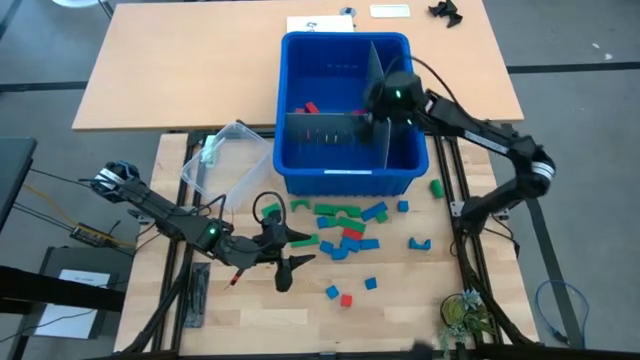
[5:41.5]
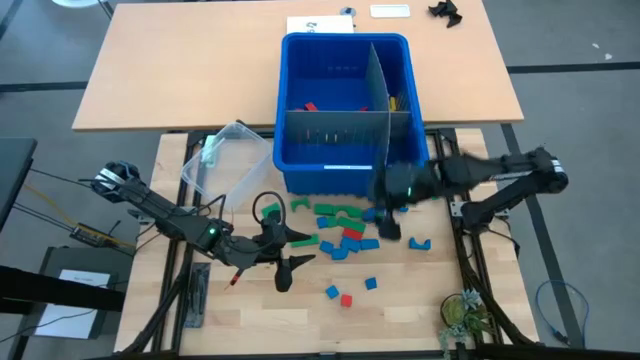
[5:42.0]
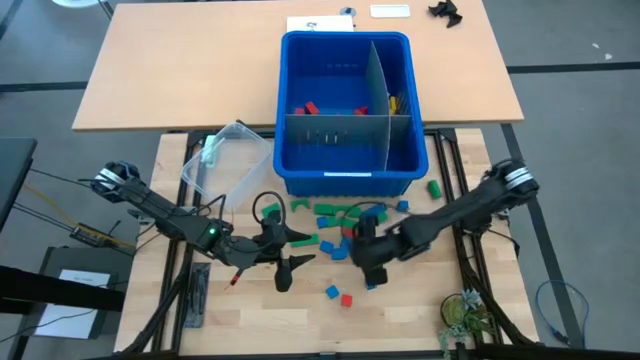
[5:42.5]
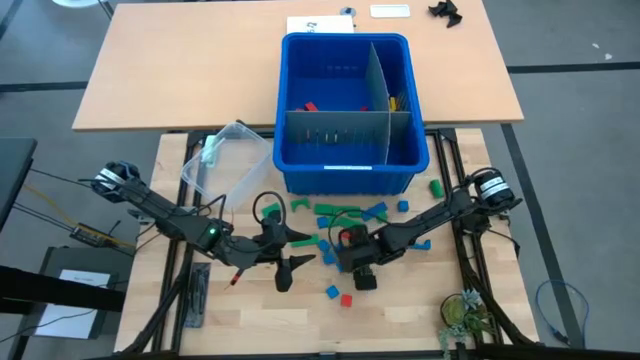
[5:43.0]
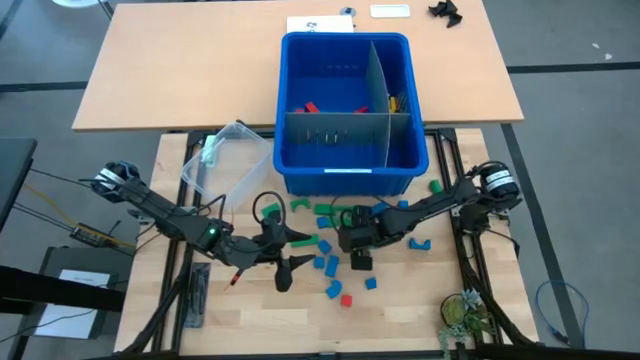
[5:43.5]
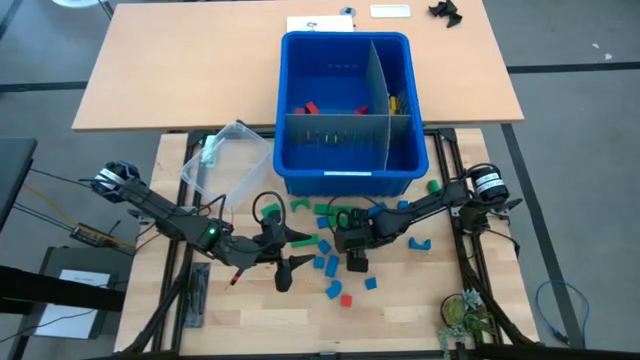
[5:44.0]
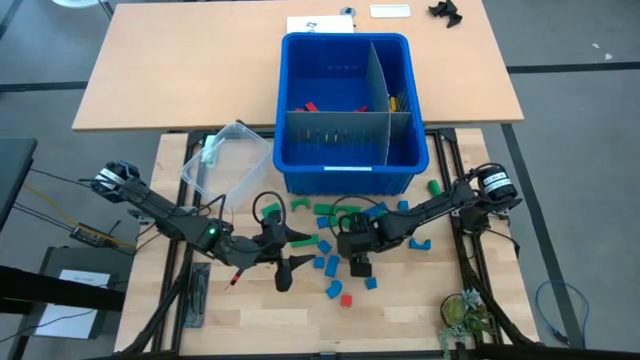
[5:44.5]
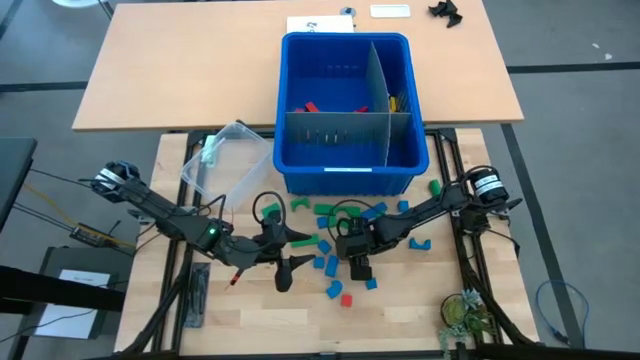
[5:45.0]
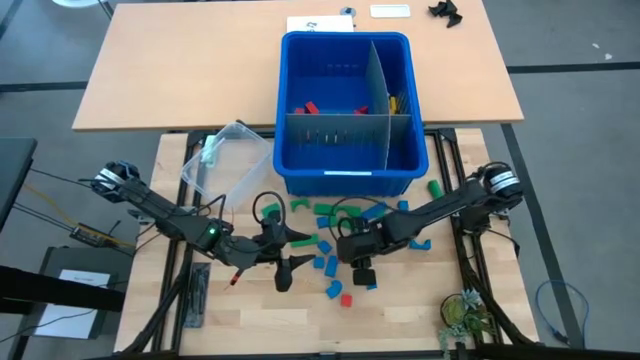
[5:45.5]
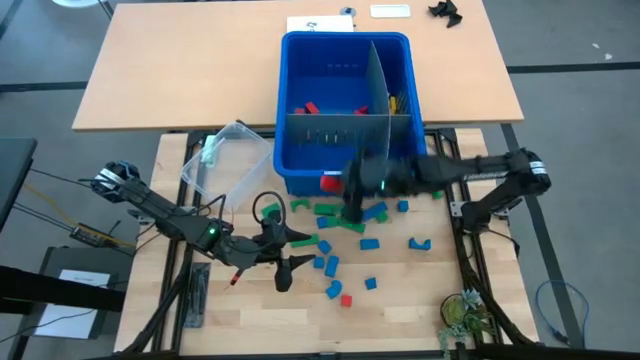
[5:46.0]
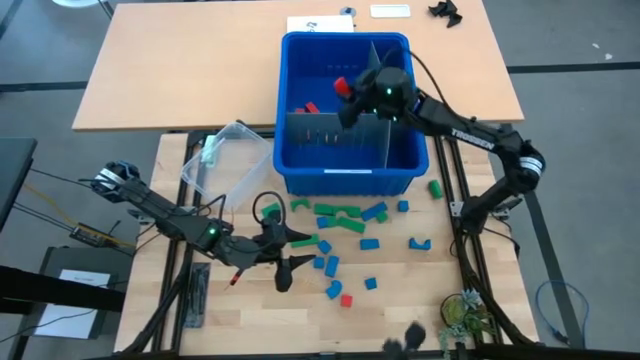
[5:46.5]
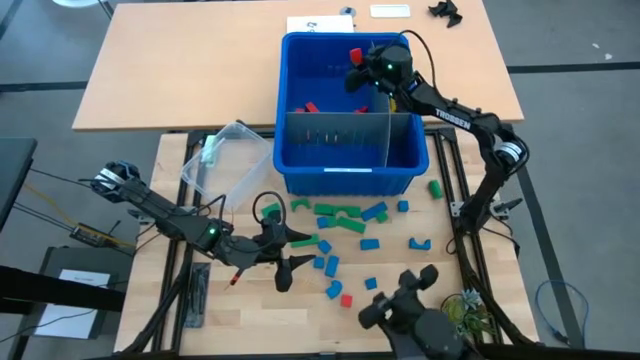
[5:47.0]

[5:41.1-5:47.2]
Task: Sort blocks
Put the red block into the blue bin

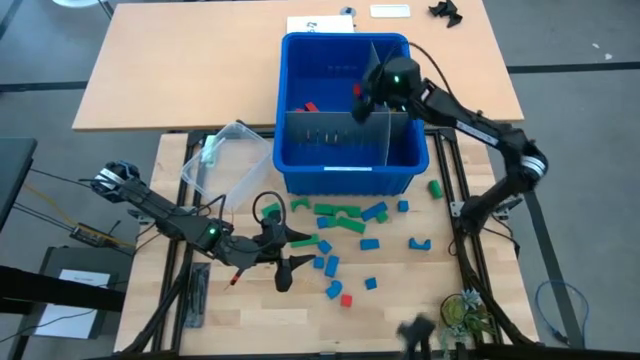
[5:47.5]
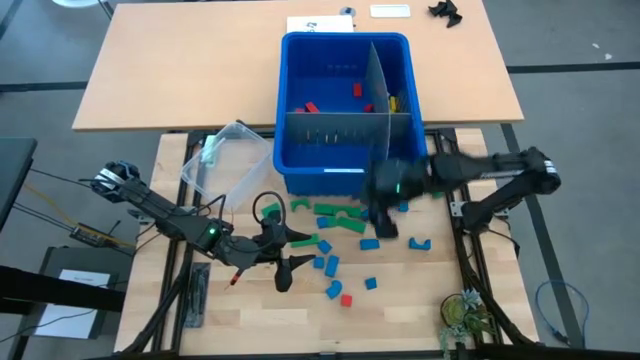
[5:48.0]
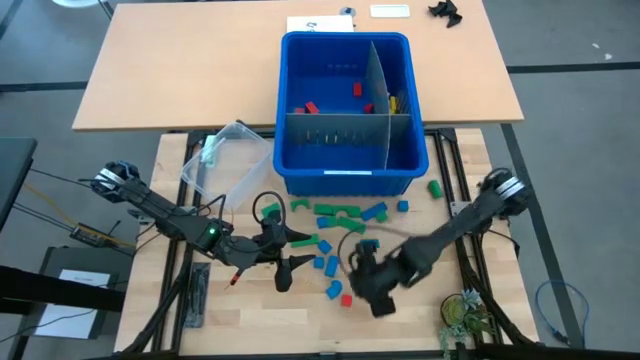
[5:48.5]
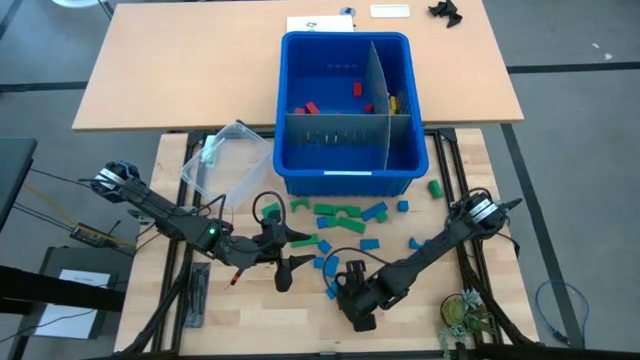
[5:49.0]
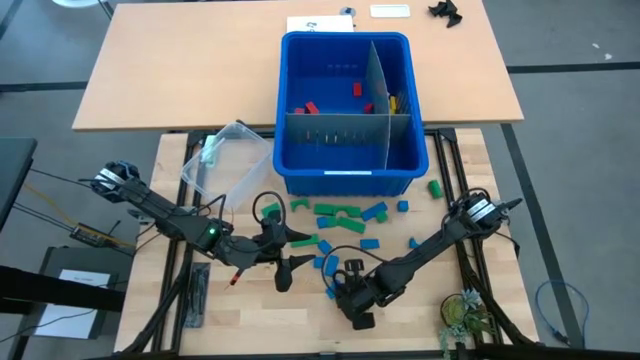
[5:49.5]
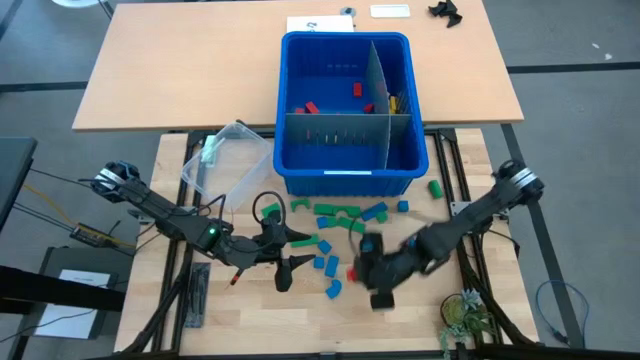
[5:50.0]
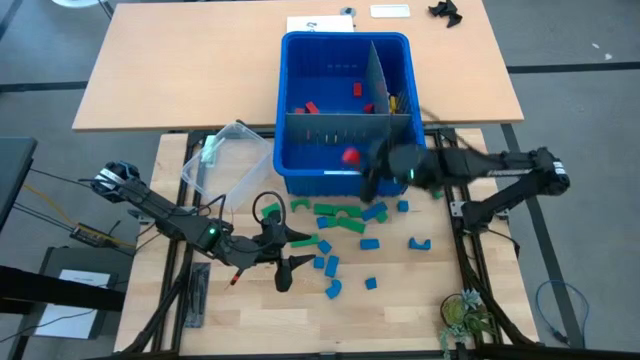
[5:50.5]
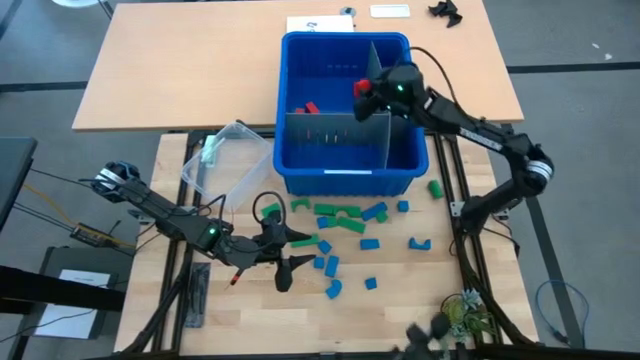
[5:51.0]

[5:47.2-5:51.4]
Put the red block into the blue bin

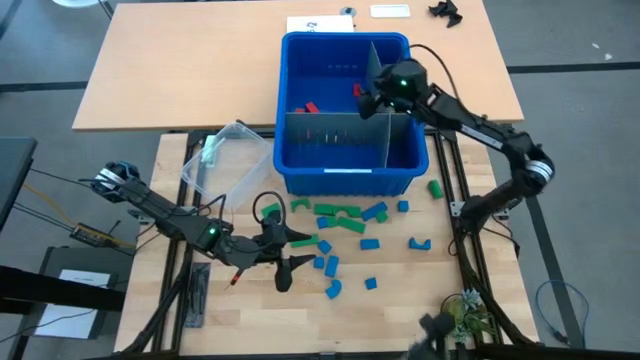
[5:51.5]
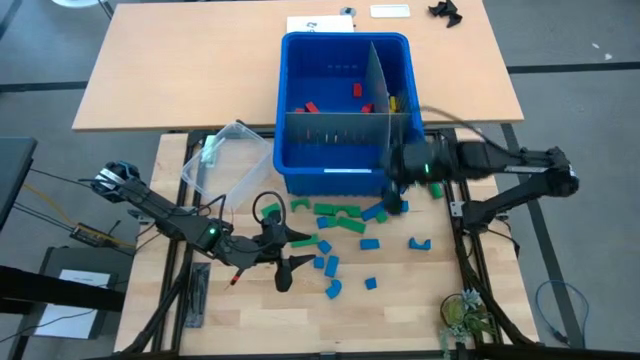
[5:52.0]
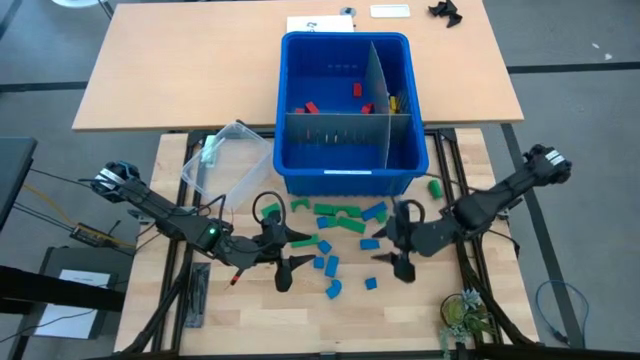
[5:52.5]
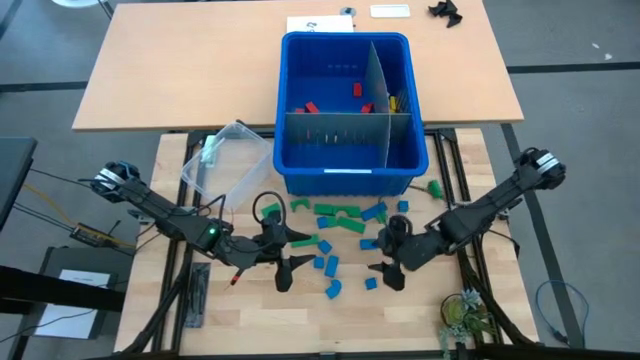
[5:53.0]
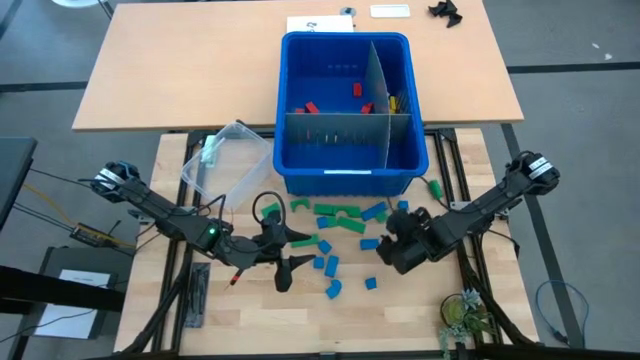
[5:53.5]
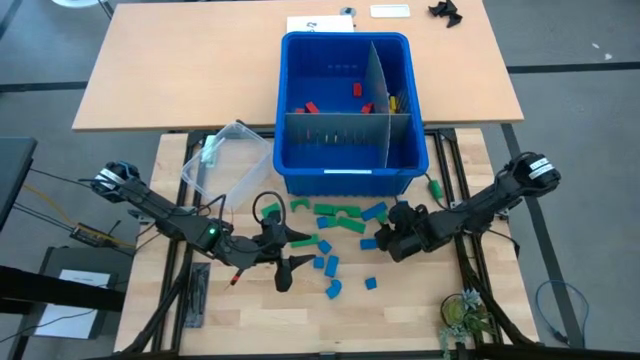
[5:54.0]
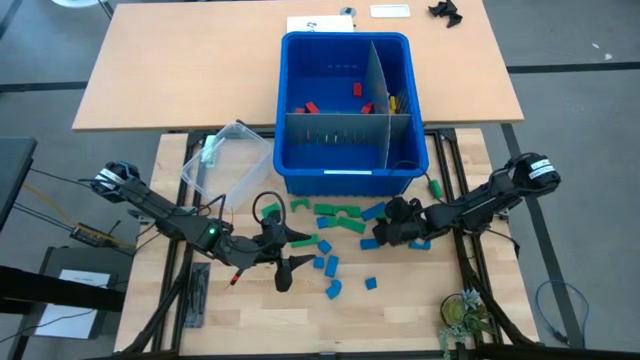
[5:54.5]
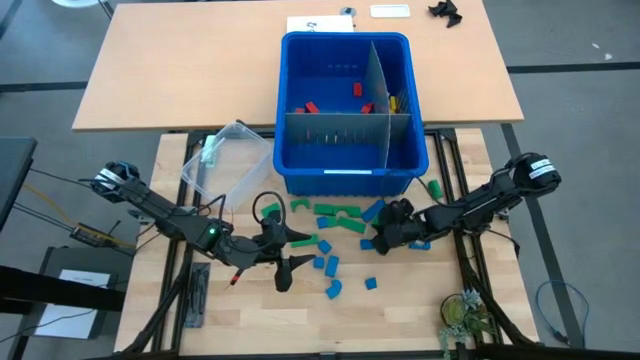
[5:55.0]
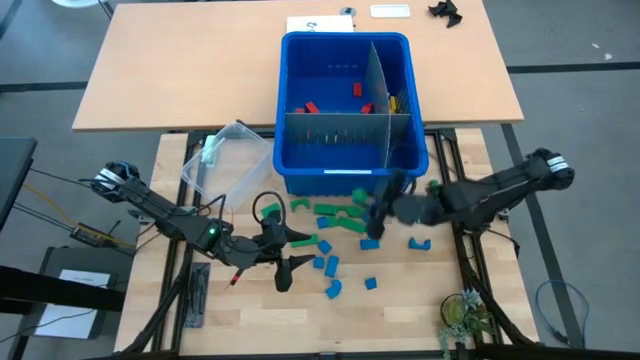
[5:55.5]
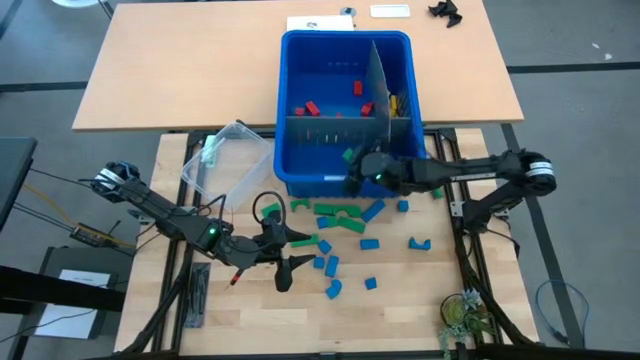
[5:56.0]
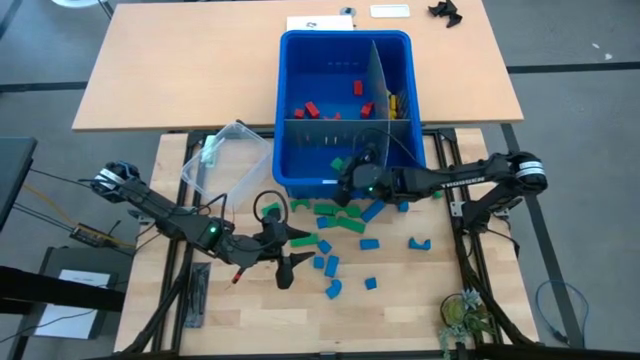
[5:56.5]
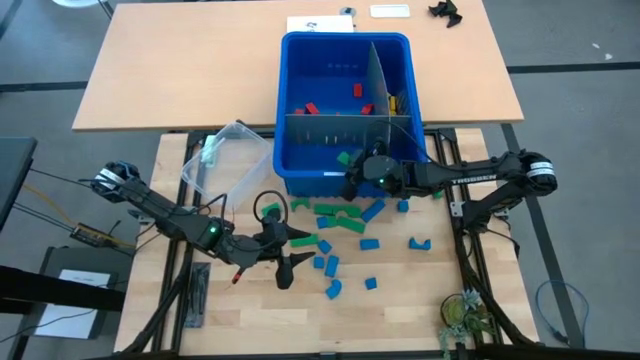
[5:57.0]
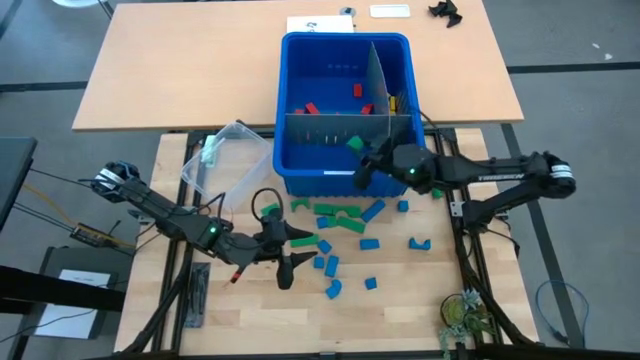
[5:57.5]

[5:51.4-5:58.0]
Put the green block into the blue bin

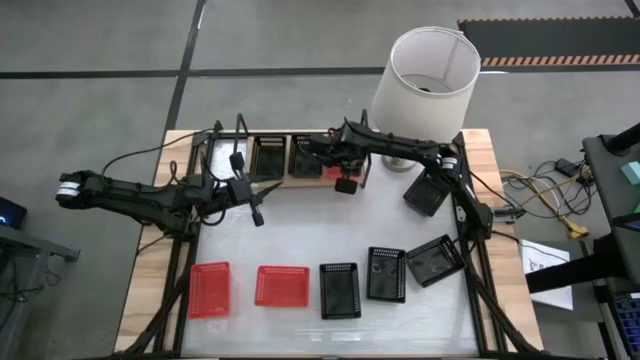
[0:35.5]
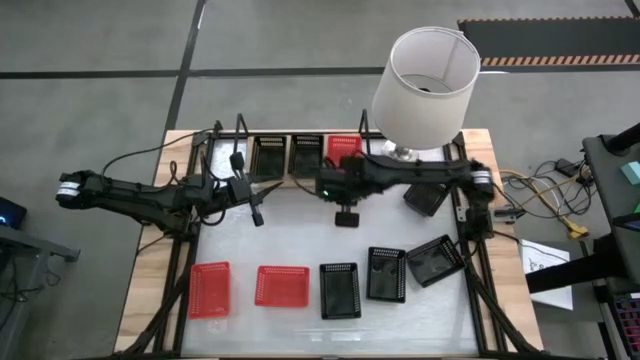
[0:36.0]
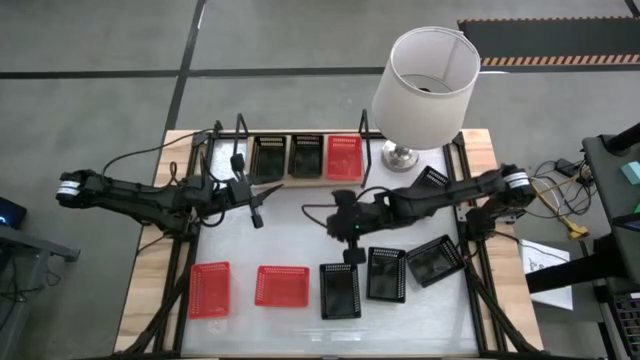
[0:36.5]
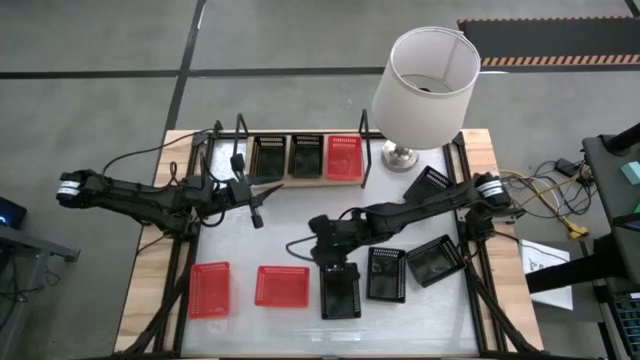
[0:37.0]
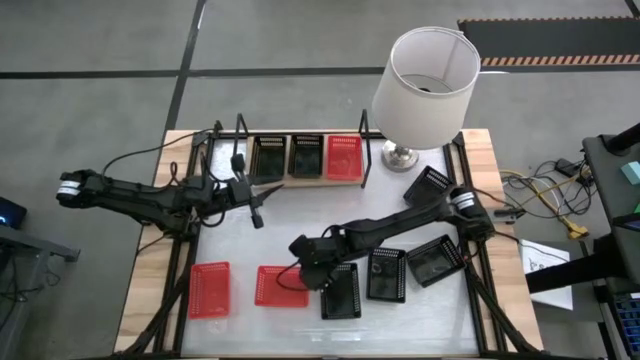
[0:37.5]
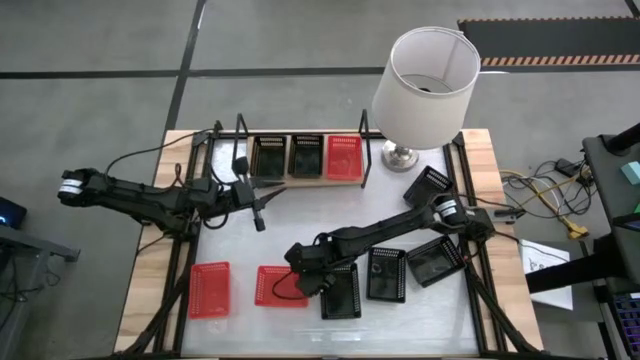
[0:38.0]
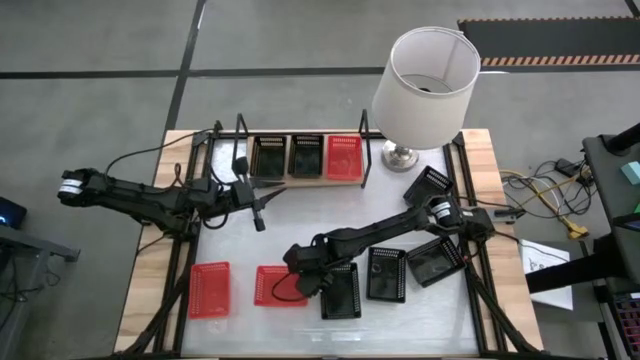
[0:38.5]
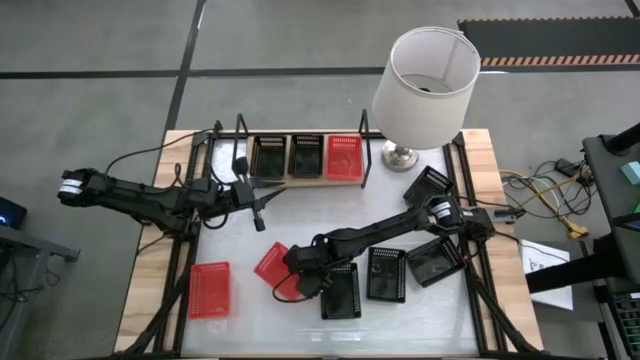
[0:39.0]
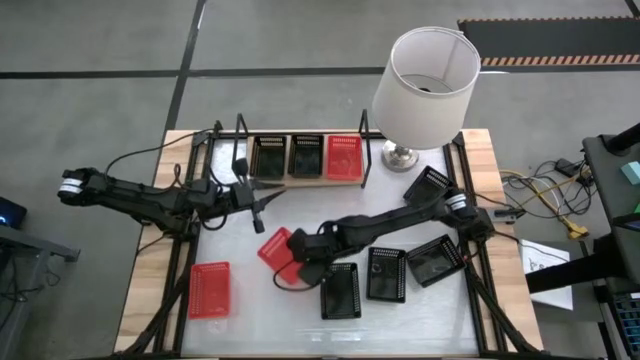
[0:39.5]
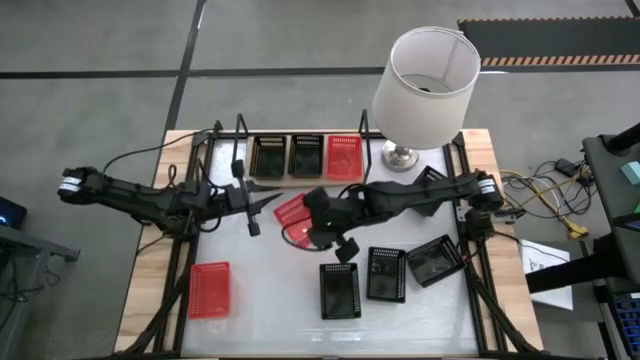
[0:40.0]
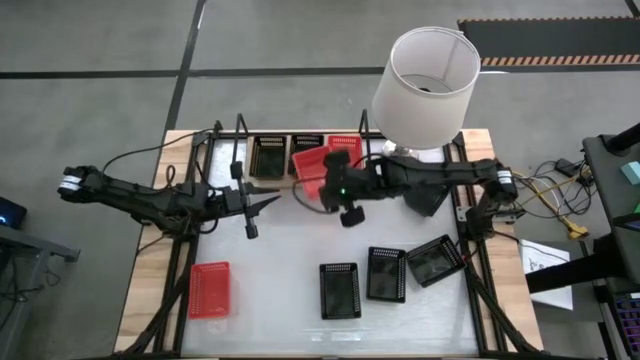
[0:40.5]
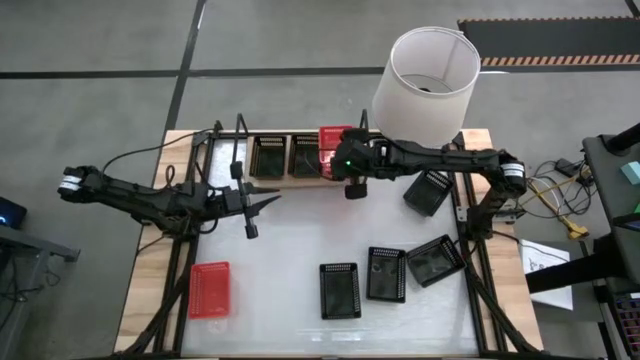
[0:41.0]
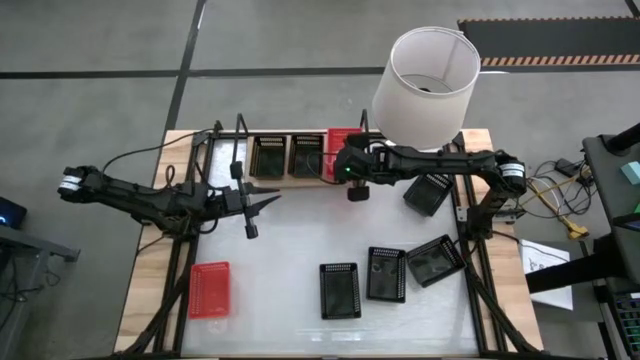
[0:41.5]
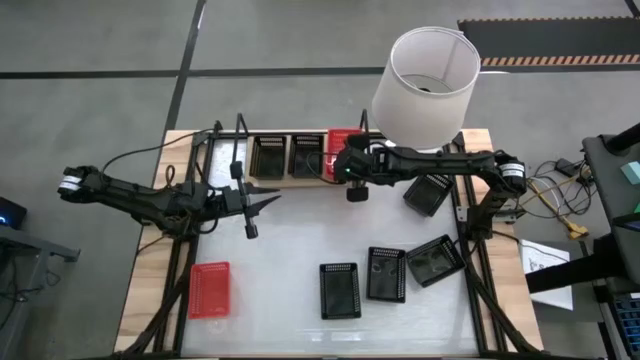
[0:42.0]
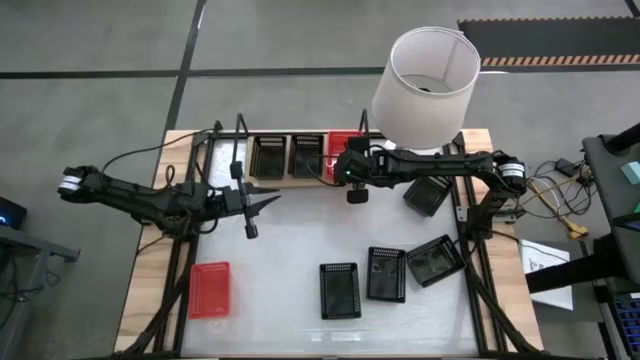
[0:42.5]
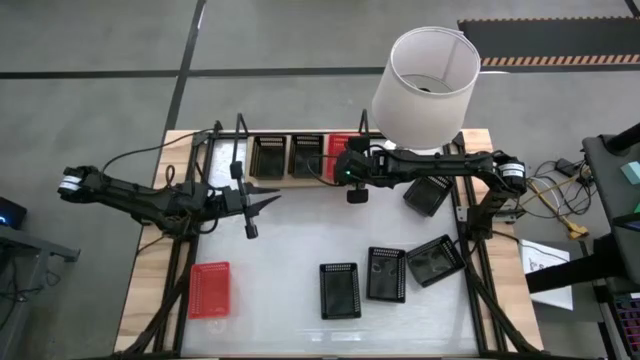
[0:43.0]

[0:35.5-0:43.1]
Task: Stack baskets on shelf by color
Stack the left red bin on the red bin on the shelf
